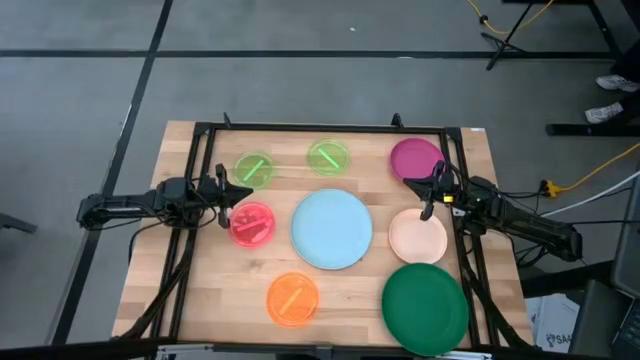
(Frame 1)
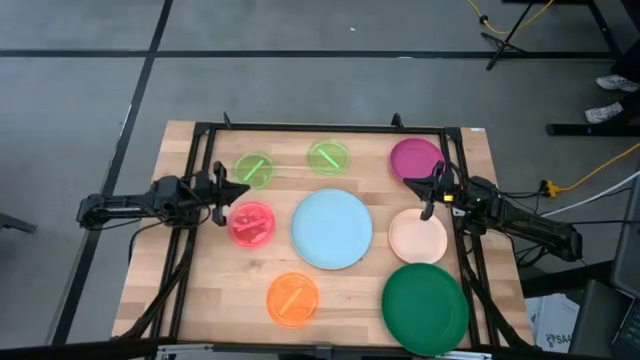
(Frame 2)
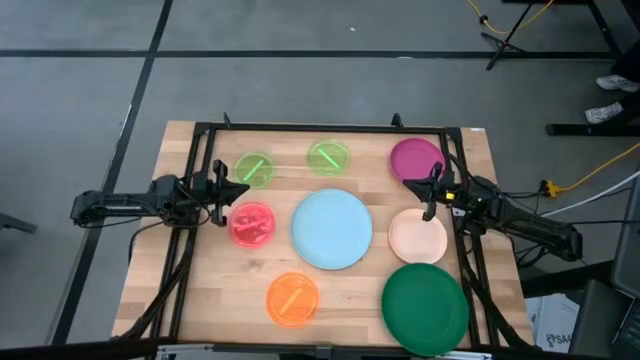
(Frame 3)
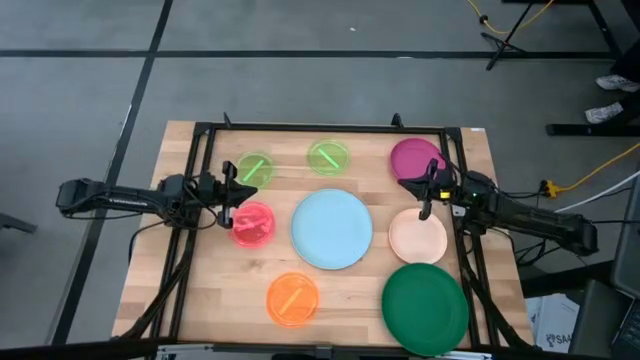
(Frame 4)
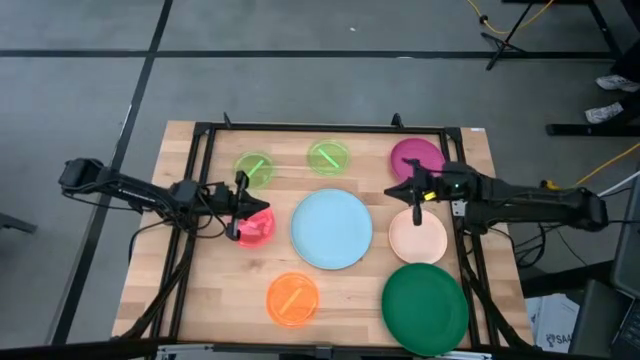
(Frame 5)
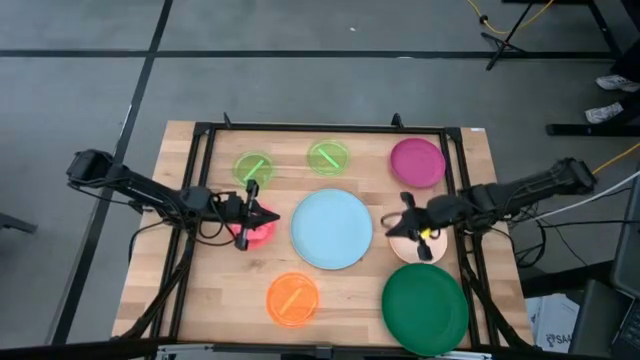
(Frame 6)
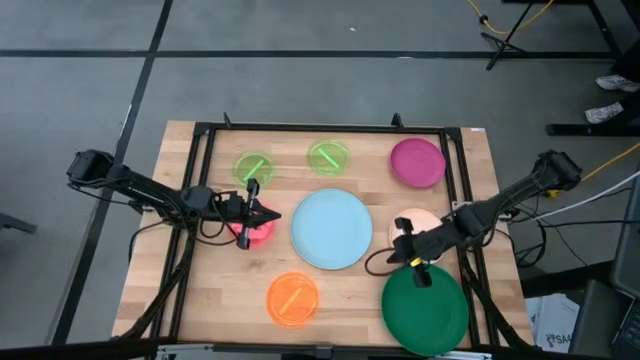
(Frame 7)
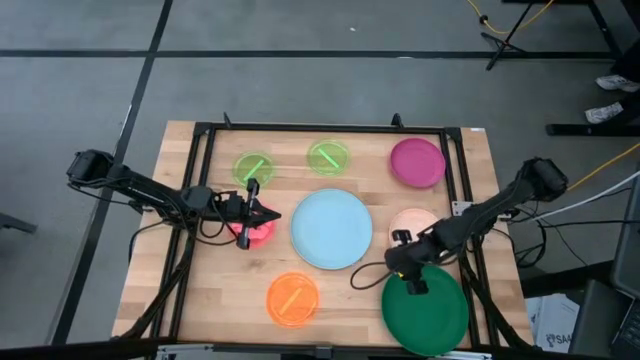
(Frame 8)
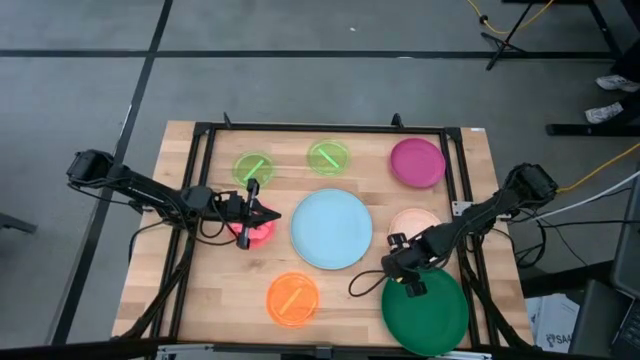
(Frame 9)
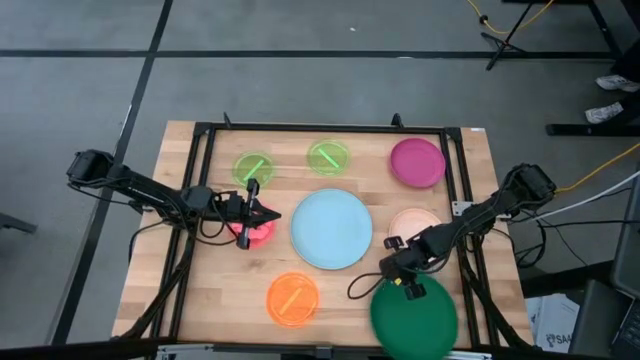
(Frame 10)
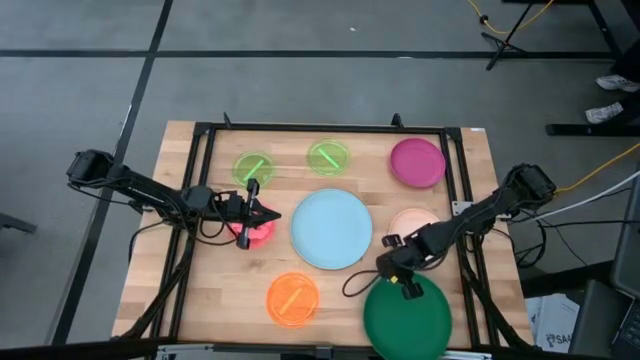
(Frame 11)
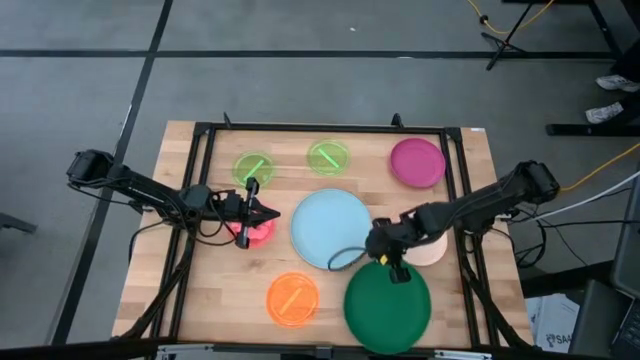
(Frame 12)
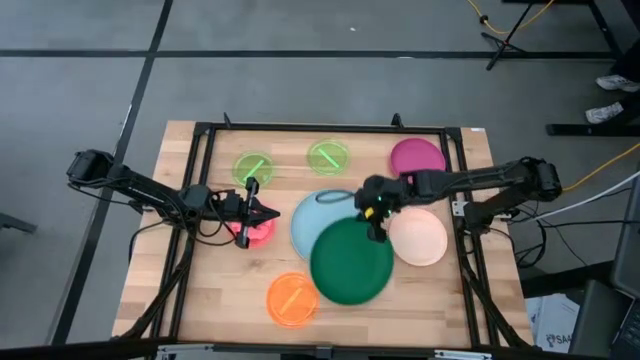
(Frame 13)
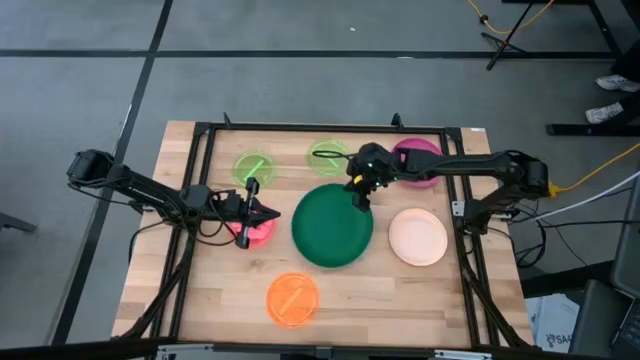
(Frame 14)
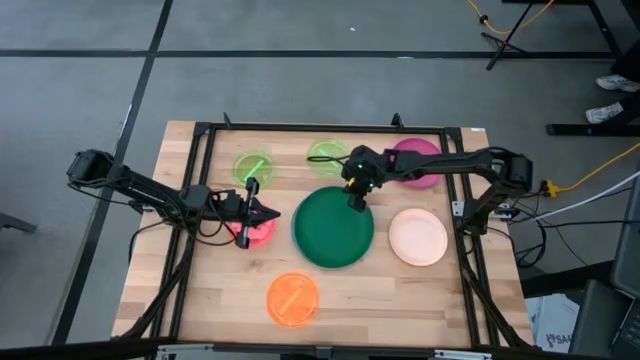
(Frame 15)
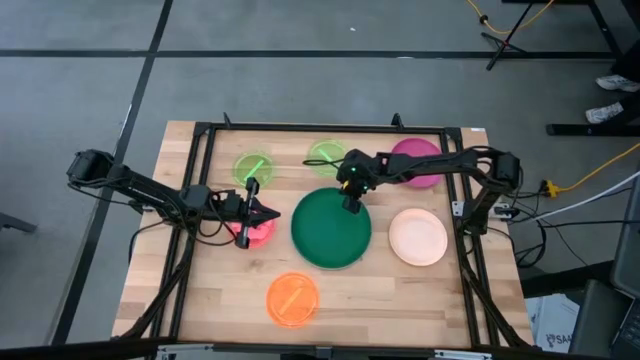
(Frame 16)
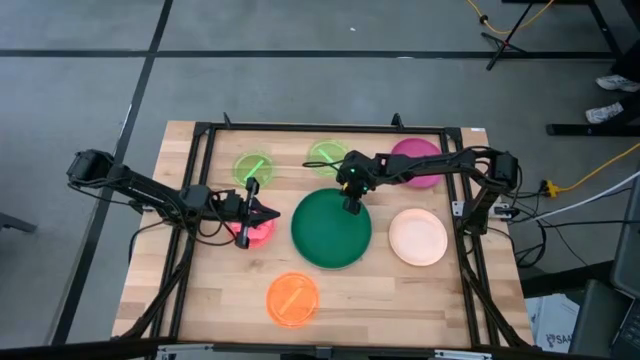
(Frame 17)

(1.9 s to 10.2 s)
Task: Stack plastic plates
Stack the green plate on top of the blue plate

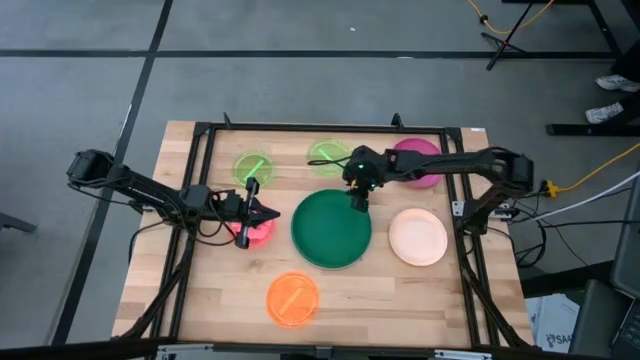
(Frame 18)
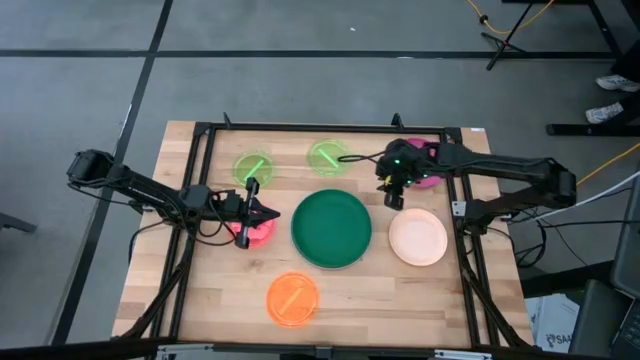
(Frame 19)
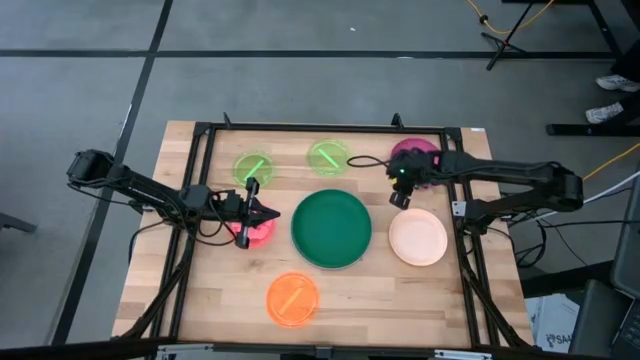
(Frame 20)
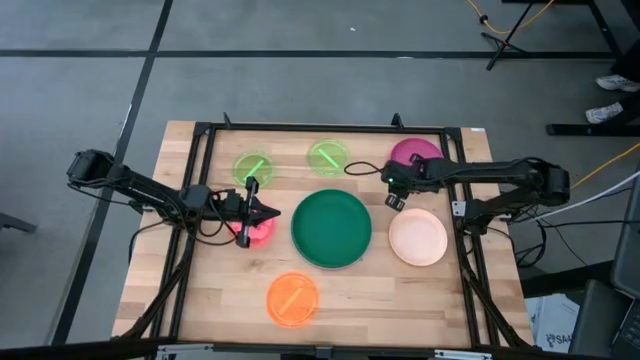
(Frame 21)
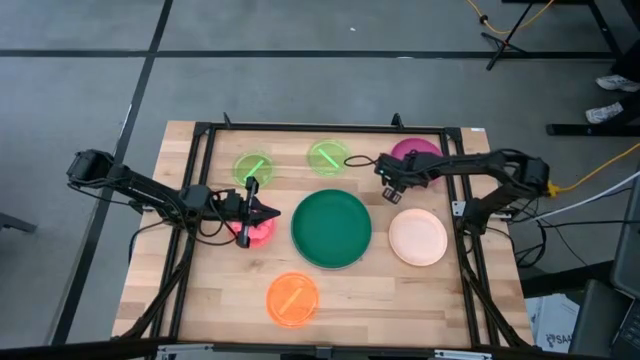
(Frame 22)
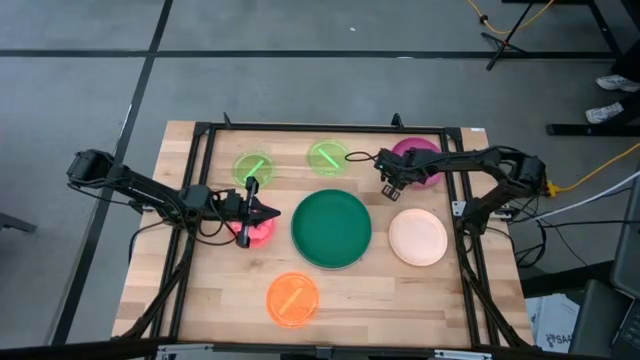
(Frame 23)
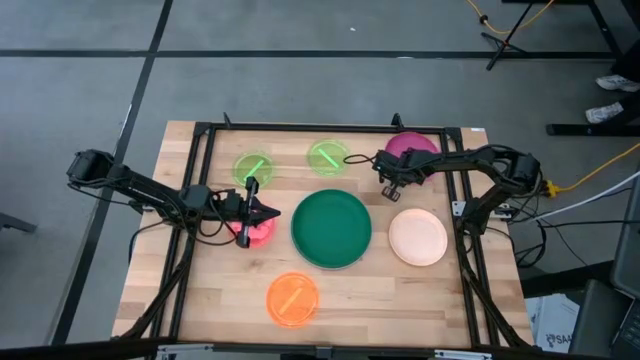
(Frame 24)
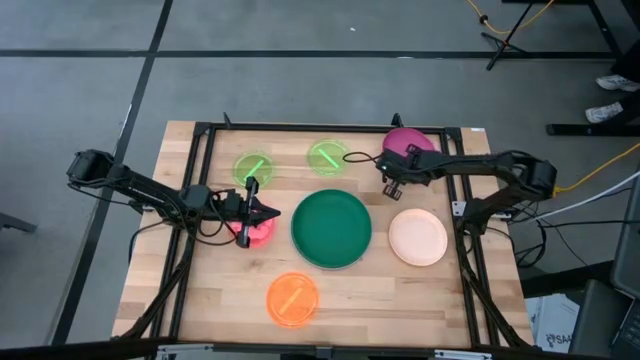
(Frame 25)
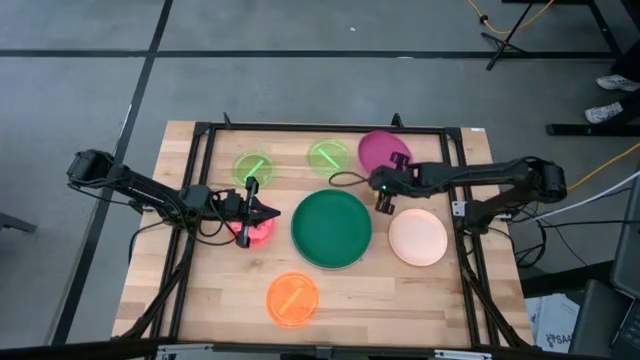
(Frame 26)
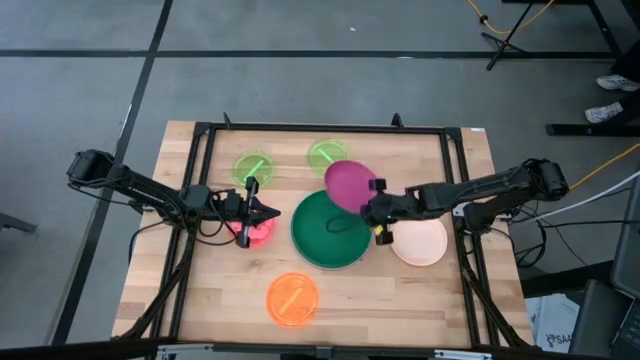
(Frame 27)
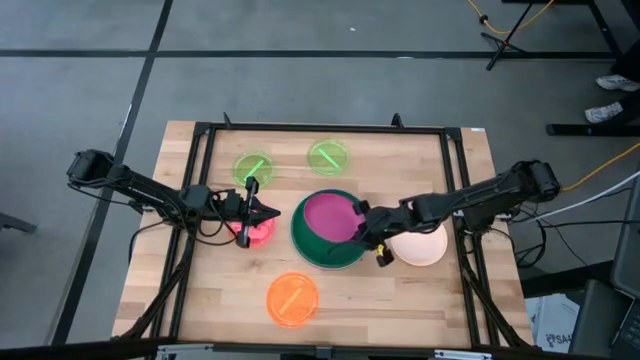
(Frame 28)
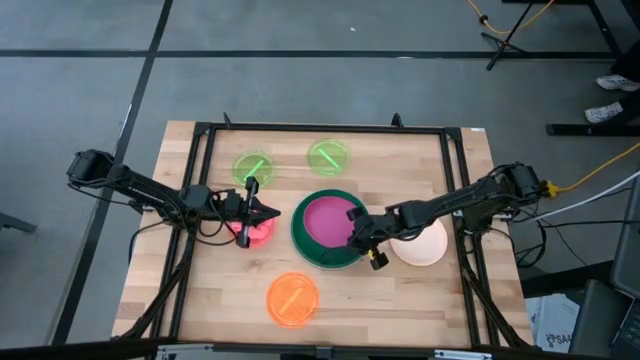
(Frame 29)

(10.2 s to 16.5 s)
Stack the pink plate on top of the green plate

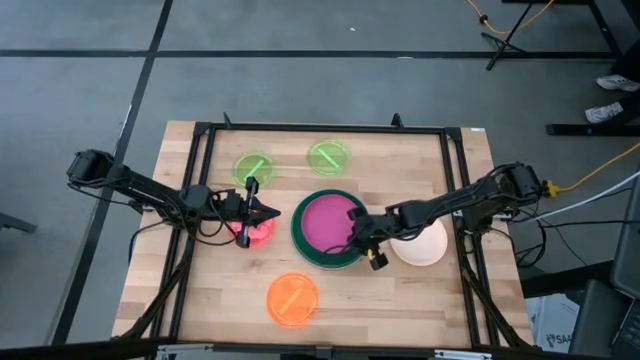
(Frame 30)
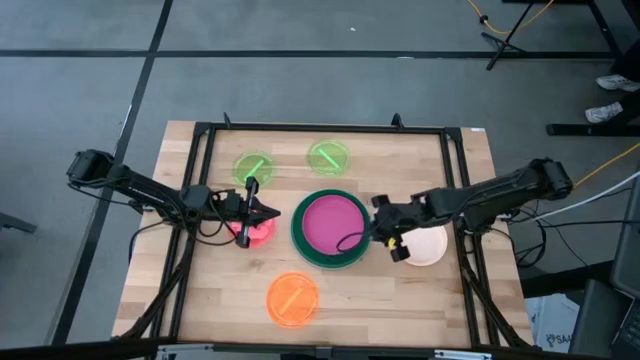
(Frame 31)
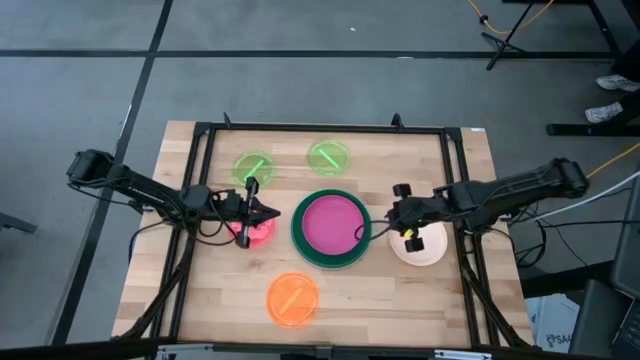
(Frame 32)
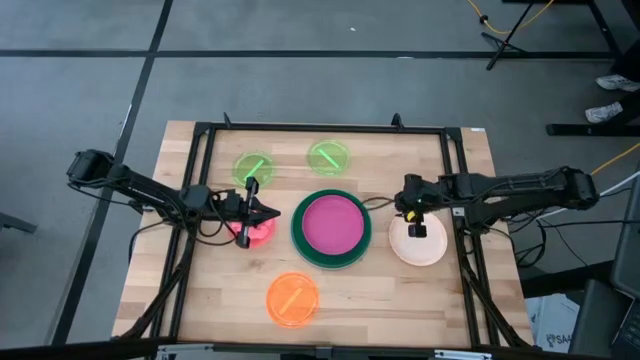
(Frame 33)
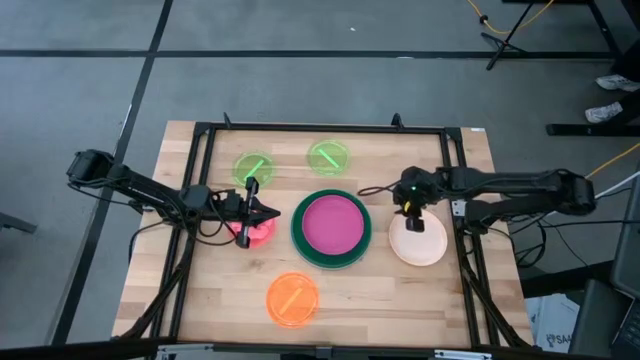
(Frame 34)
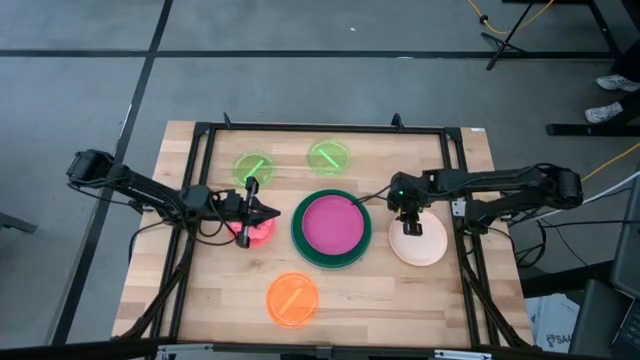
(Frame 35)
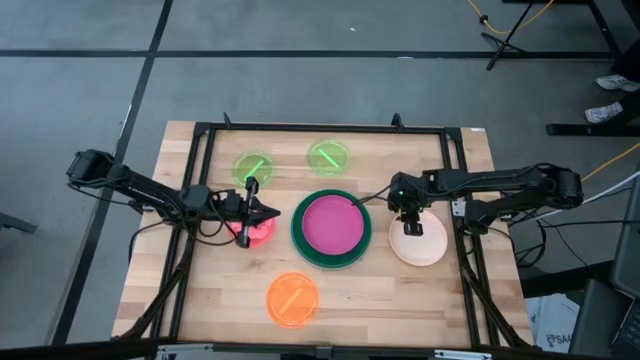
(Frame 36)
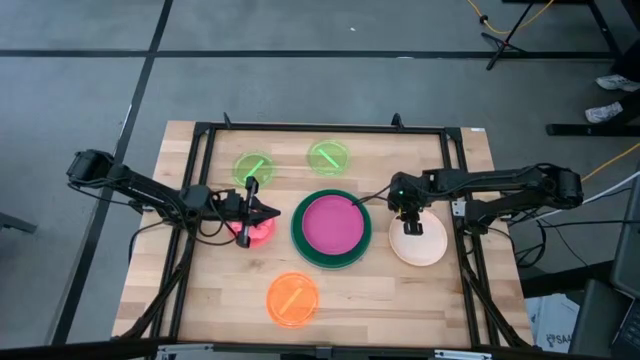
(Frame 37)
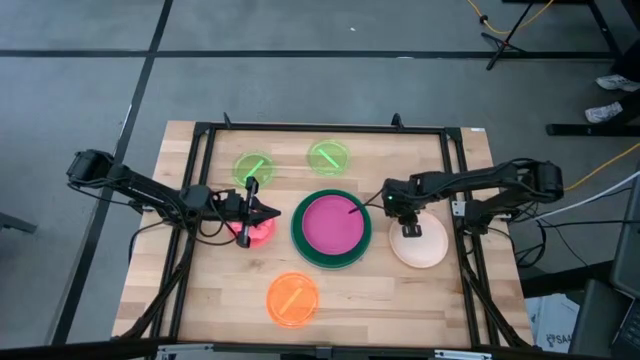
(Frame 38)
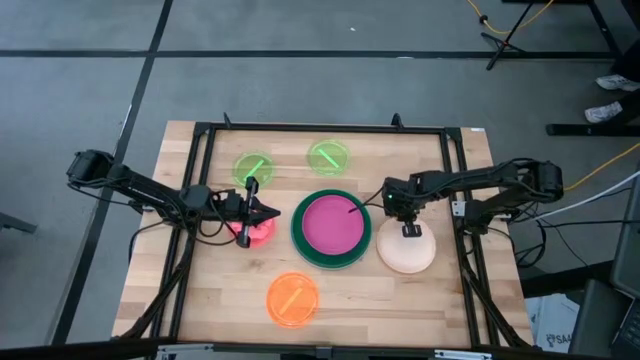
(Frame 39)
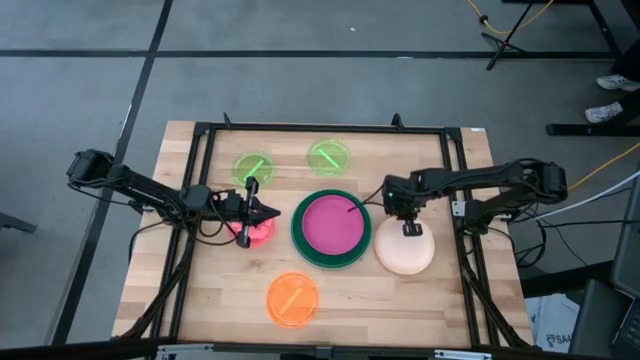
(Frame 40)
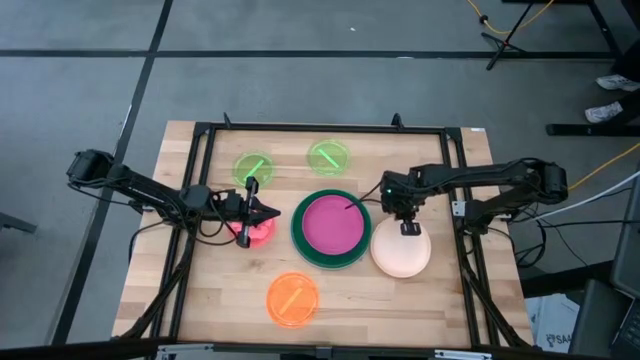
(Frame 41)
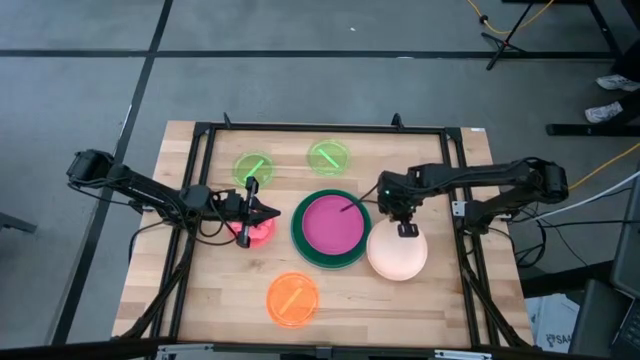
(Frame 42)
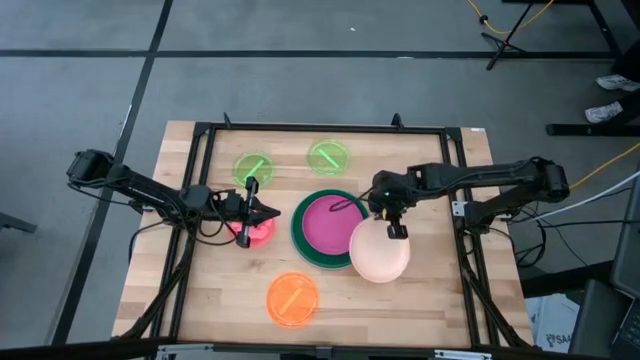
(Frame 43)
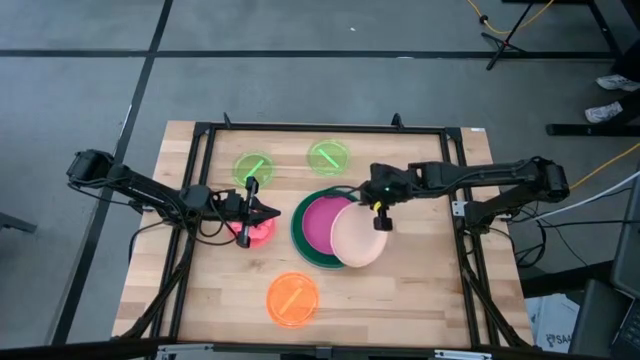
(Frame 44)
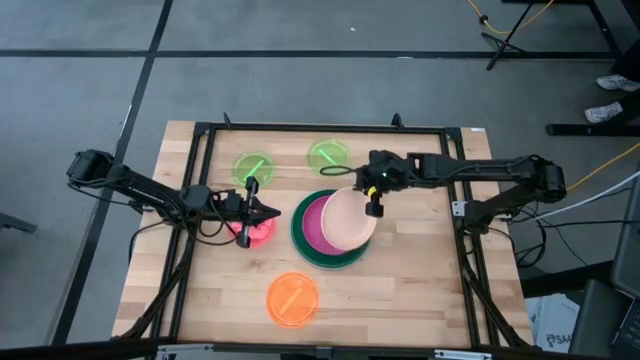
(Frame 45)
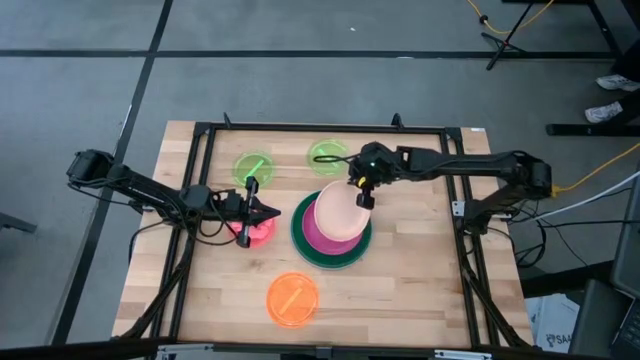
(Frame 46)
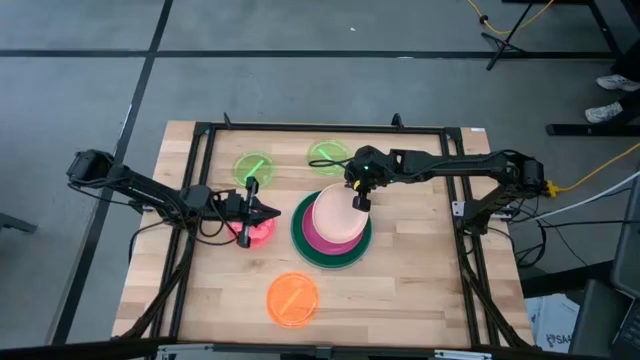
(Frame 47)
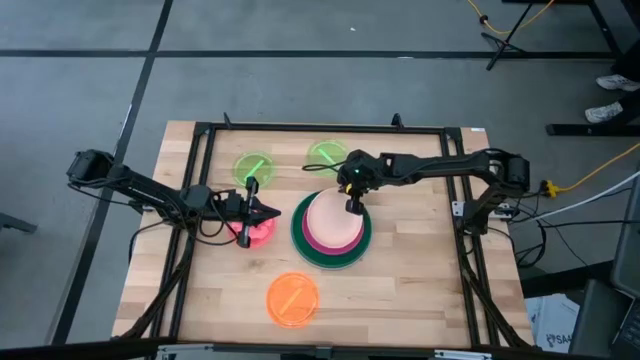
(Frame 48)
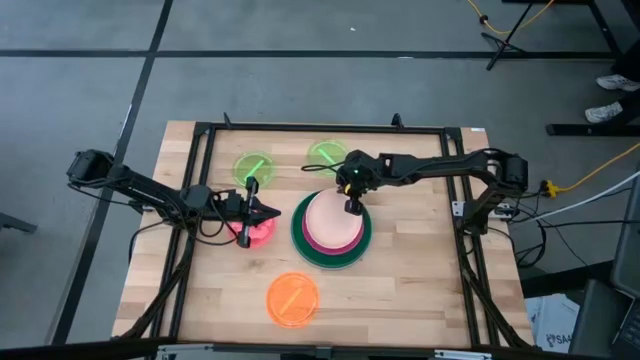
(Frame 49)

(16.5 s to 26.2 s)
Stack the orange plate on top of the pink plate
